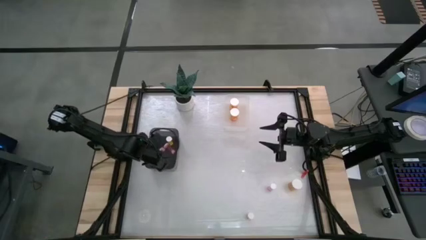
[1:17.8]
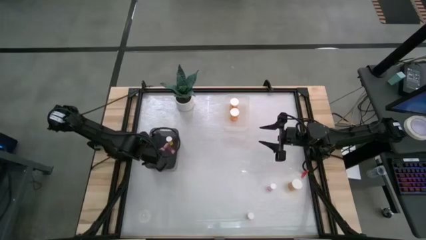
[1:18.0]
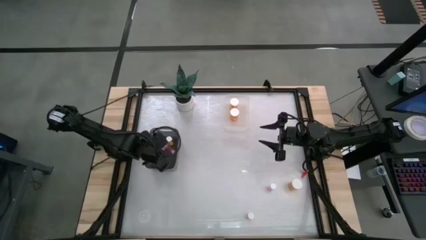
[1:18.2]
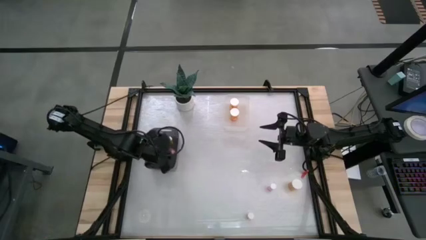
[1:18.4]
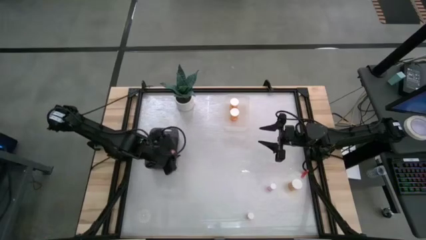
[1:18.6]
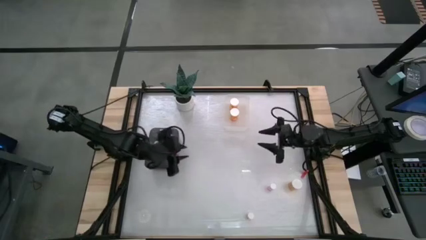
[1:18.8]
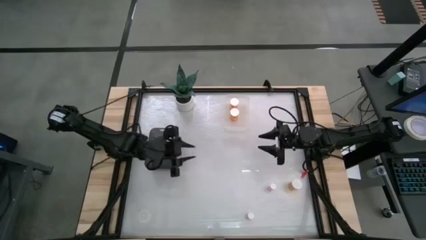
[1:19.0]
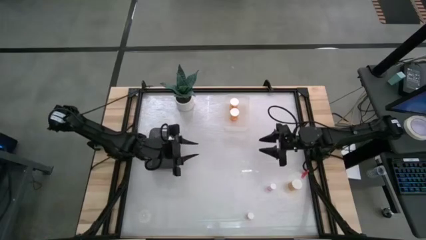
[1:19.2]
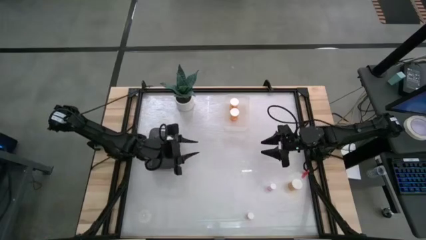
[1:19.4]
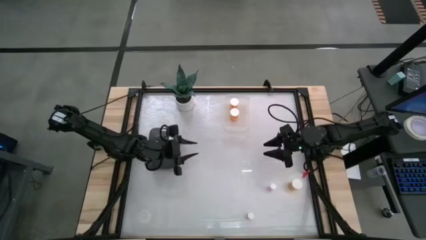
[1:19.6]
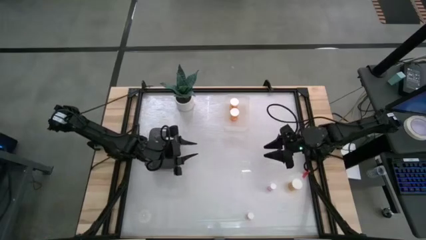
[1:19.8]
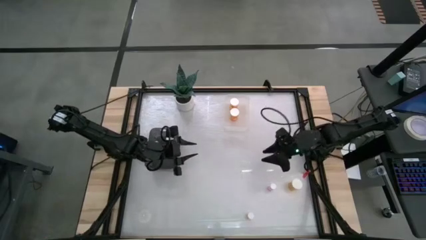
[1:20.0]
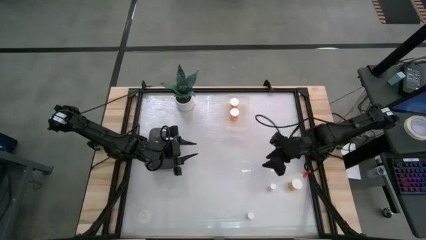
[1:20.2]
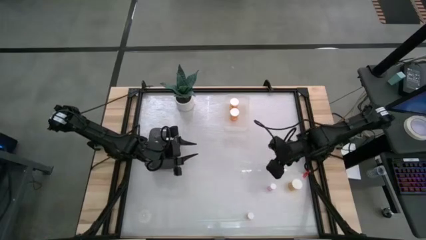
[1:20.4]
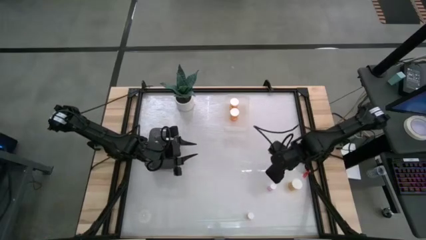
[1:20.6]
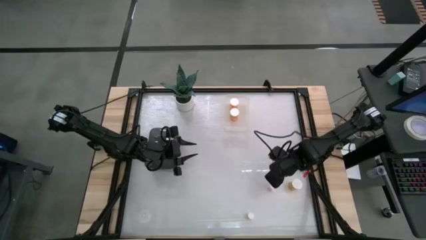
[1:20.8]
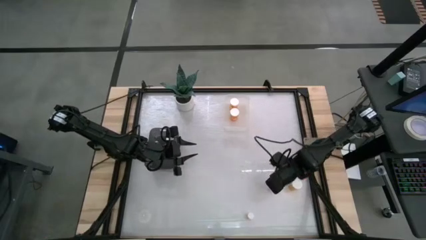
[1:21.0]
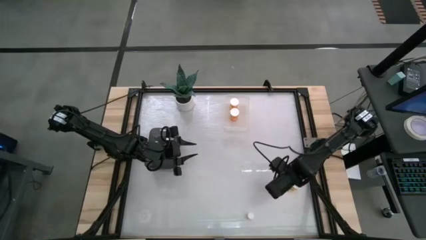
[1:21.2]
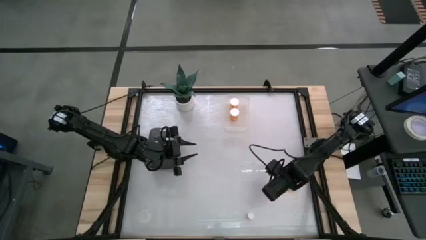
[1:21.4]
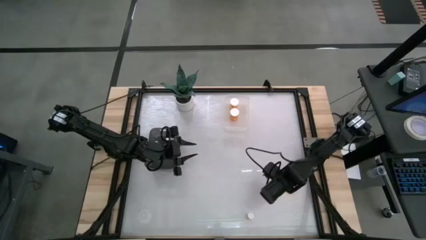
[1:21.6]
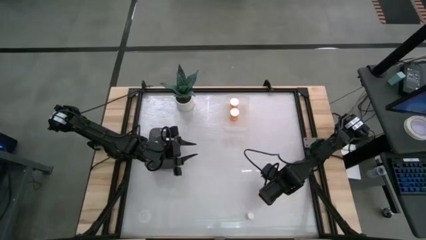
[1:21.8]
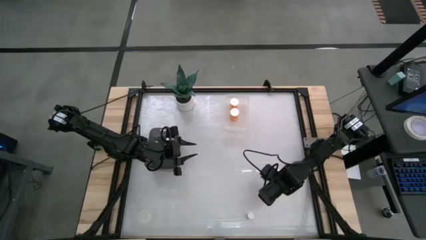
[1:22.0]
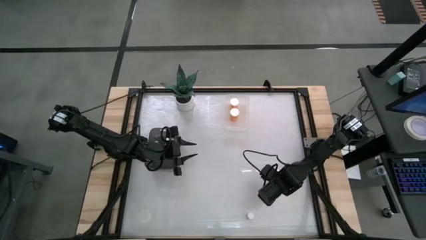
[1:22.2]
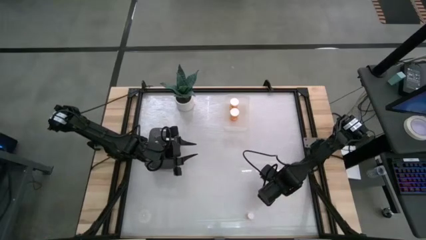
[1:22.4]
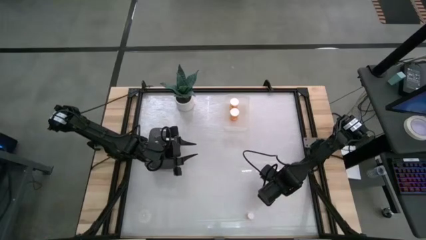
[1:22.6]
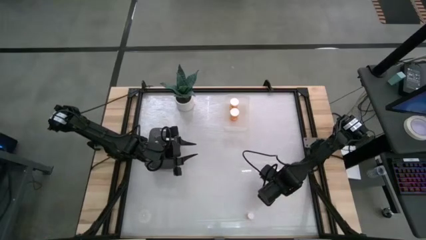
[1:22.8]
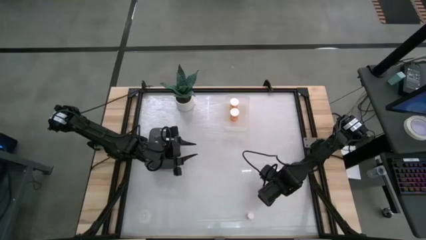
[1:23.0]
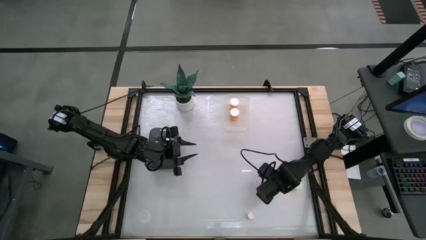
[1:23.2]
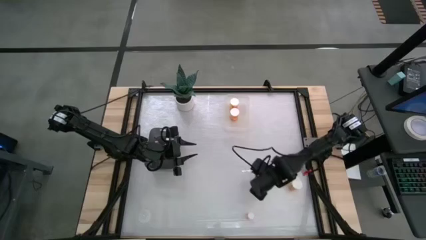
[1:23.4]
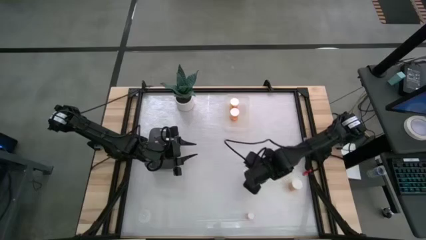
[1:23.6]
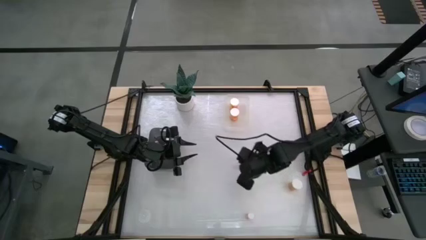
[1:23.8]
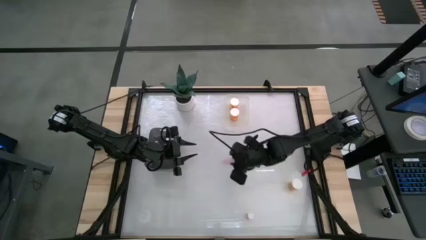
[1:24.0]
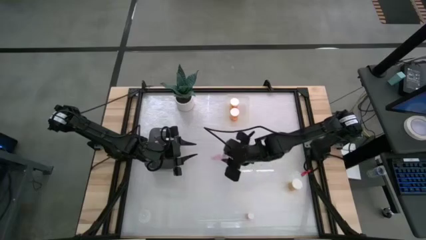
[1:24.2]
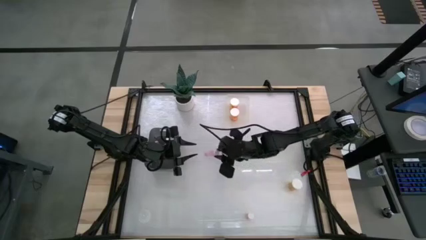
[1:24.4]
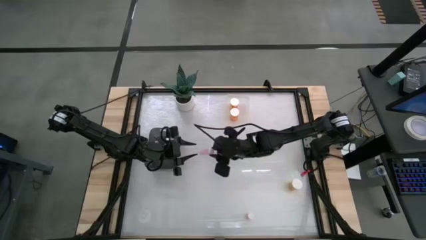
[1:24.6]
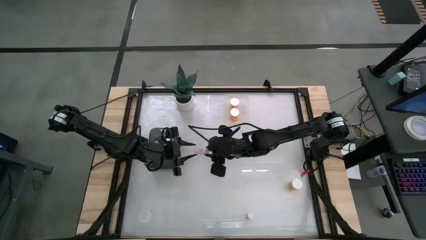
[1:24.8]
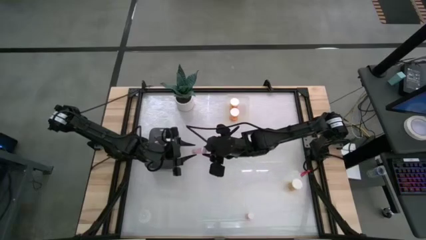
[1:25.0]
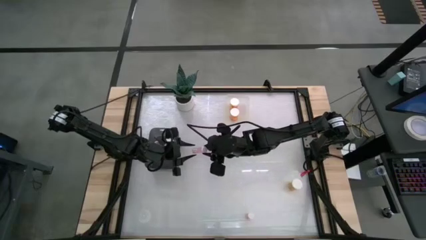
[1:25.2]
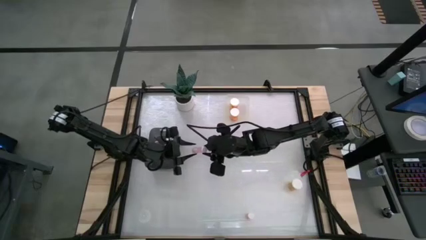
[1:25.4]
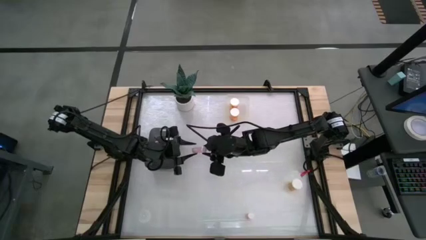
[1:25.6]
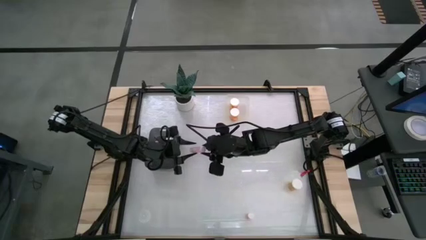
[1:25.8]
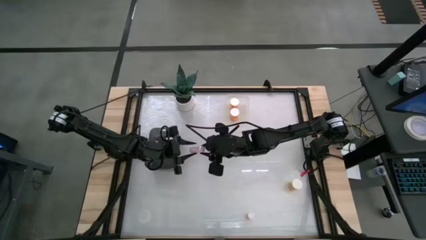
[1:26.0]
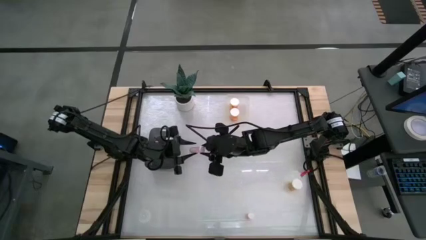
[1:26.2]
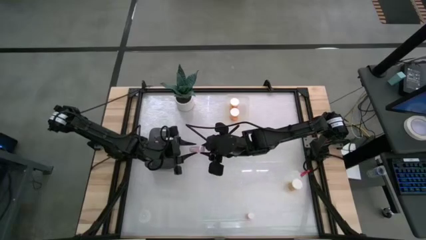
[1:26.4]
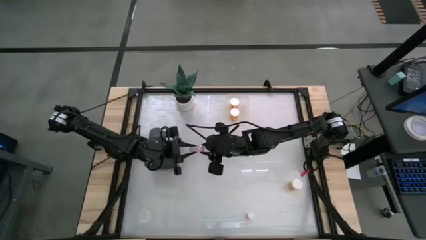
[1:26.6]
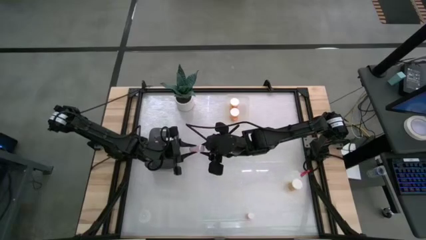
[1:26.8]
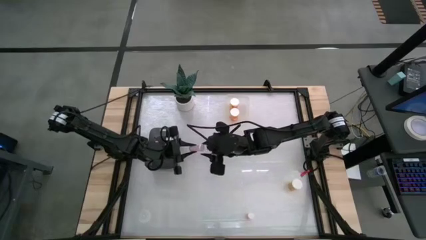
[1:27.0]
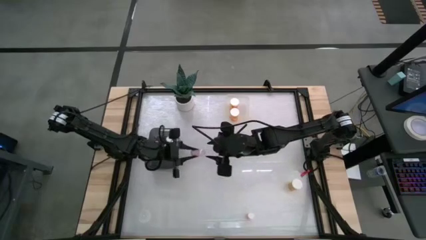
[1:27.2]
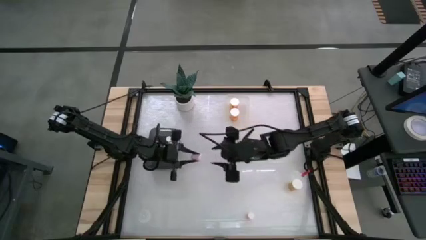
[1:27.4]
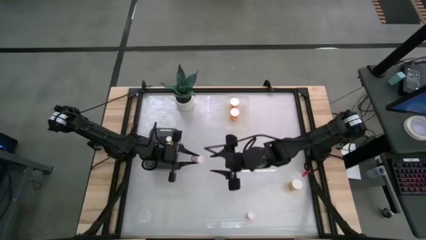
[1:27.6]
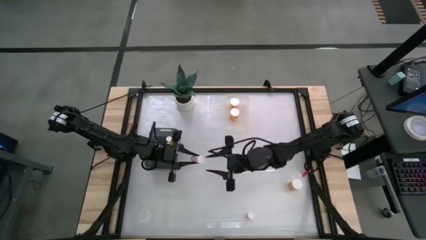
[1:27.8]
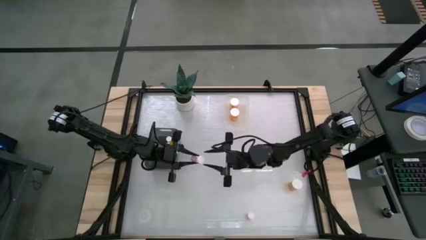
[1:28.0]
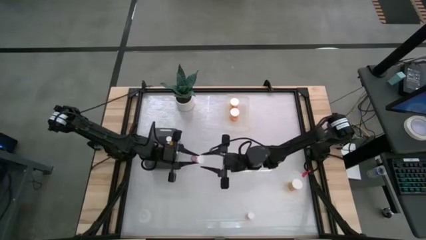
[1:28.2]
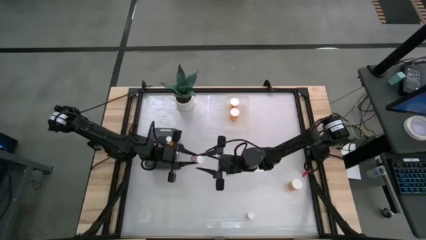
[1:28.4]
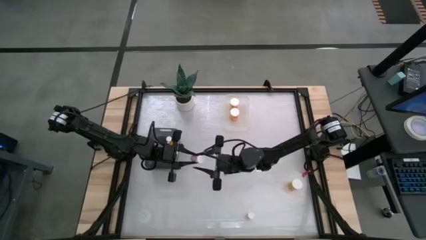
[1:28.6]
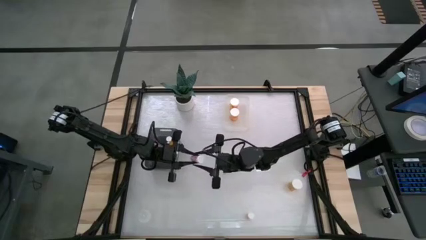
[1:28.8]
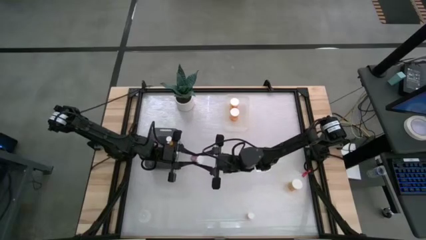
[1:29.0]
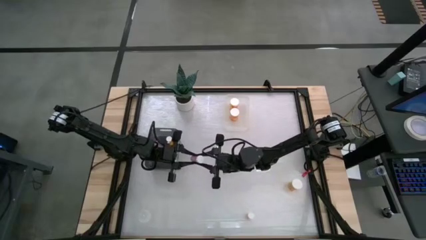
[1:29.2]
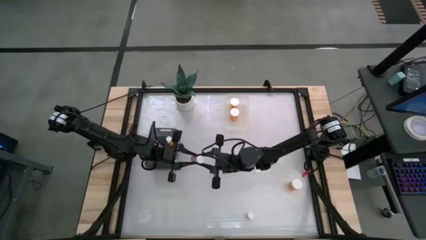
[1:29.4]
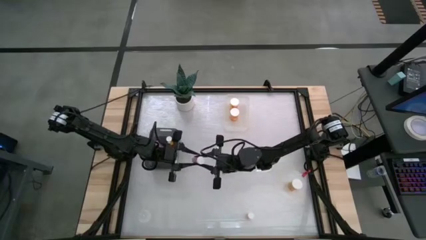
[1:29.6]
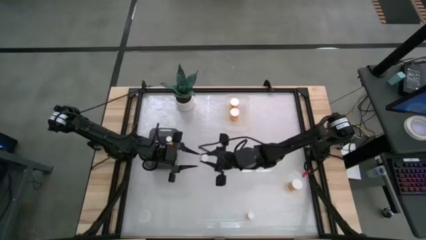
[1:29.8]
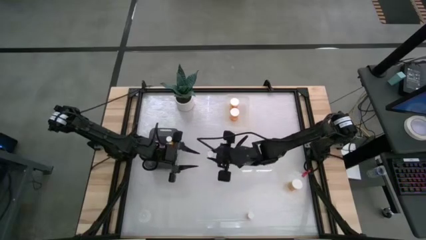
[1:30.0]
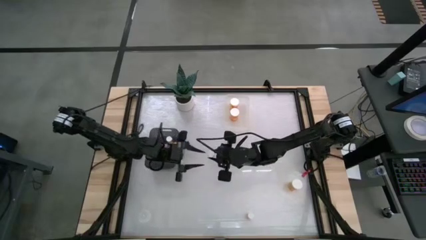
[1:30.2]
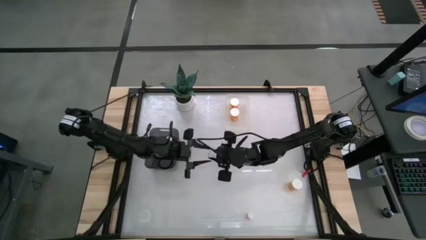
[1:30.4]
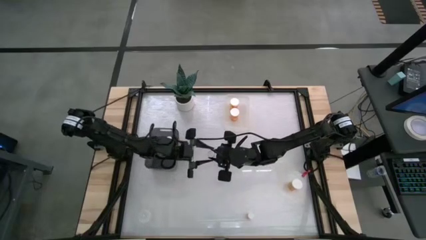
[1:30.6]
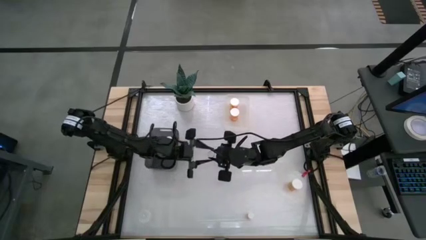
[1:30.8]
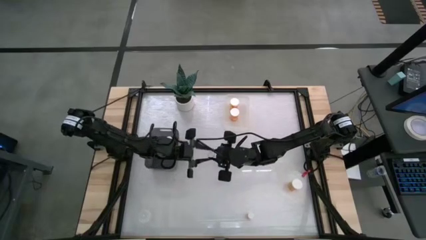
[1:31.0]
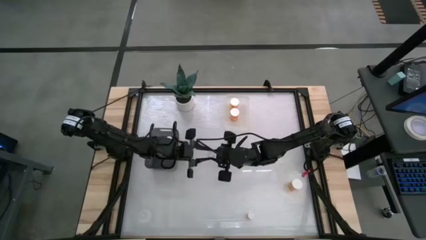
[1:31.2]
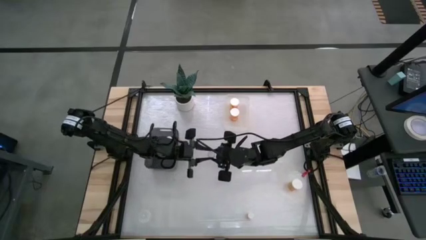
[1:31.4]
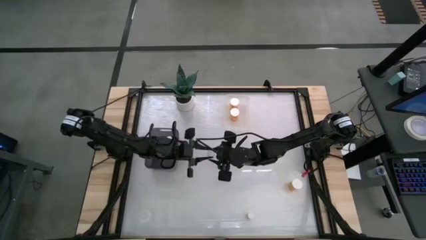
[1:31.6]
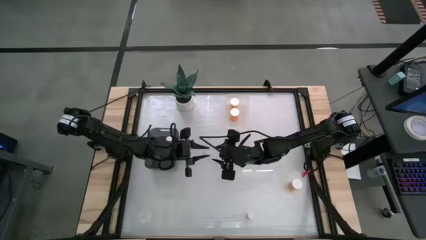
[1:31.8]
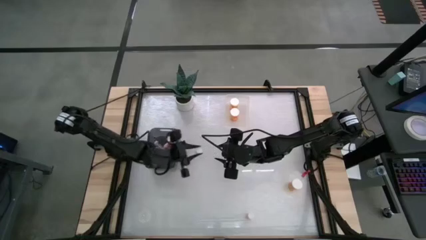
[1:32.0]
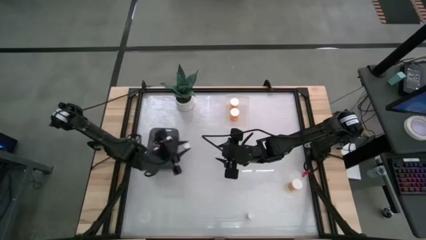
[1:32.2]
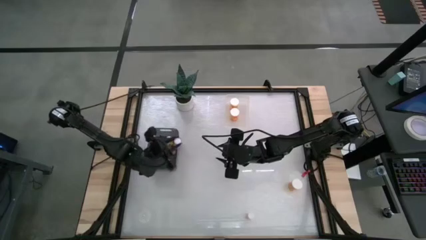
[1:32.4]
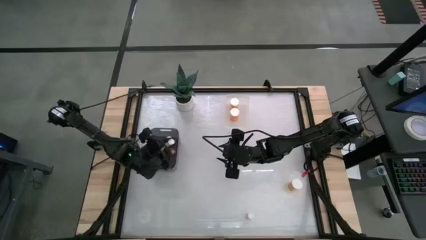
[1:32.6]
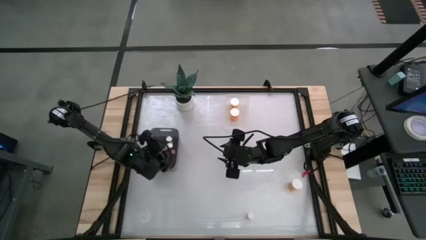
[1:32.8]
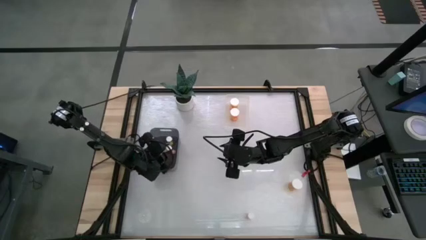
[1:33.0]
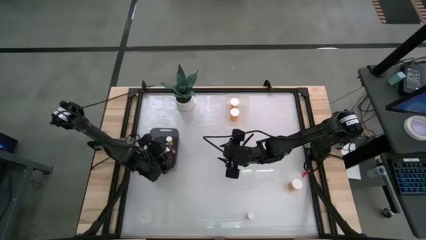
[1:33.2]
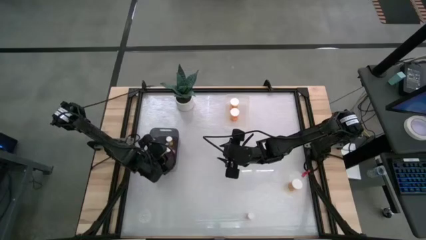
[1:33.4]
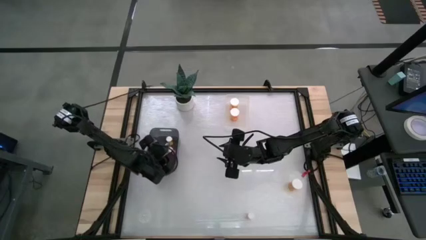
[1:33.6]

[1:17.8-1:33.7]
Task: Pick and place medicine bottles into bin by pill shape (circle, oval)
Put the top small pink pill bottle into the black bin
